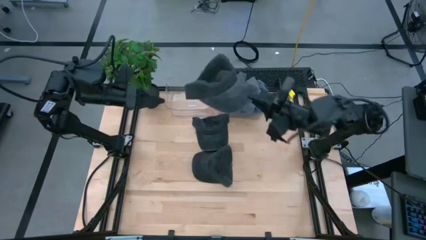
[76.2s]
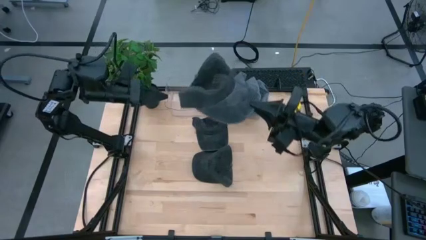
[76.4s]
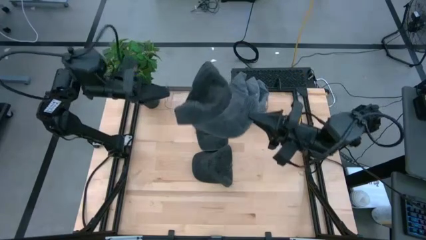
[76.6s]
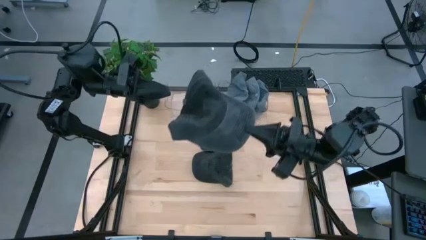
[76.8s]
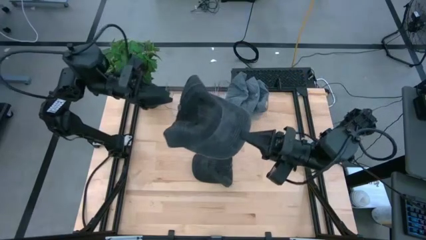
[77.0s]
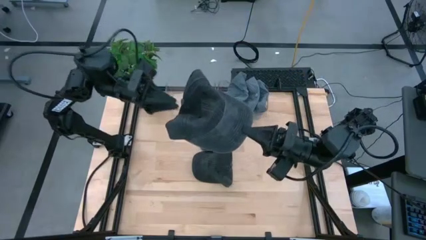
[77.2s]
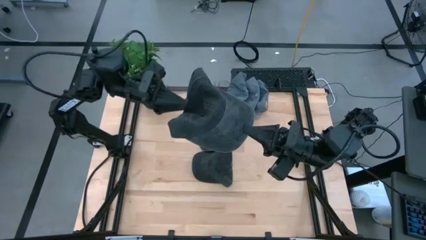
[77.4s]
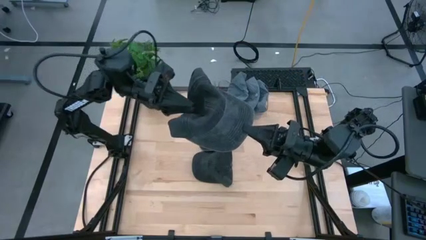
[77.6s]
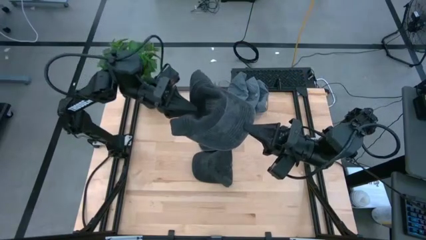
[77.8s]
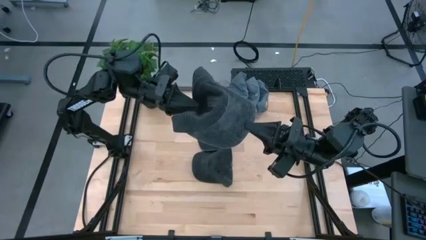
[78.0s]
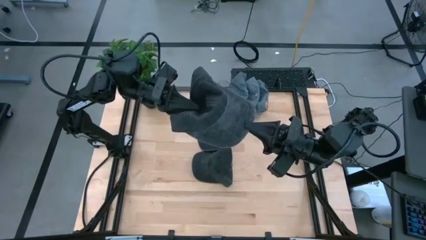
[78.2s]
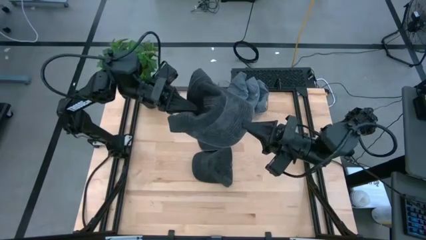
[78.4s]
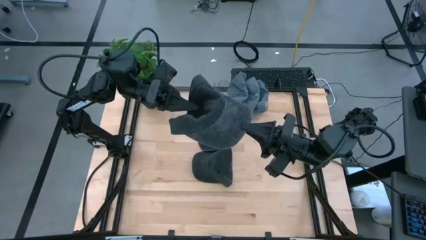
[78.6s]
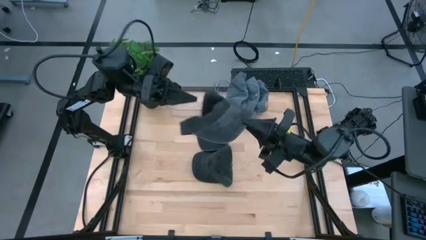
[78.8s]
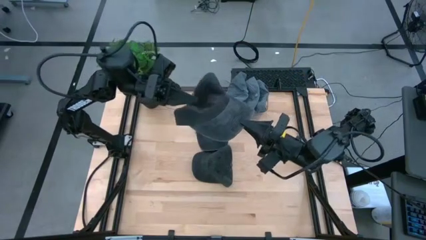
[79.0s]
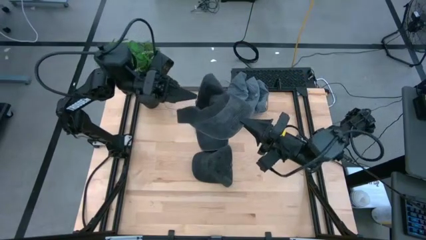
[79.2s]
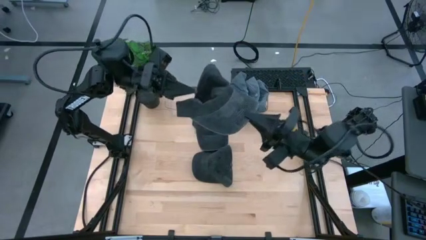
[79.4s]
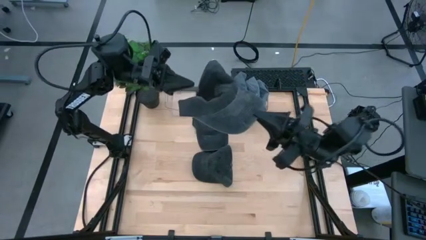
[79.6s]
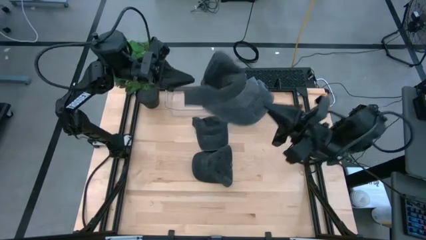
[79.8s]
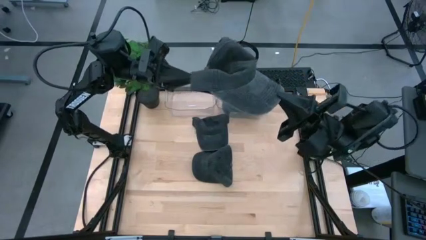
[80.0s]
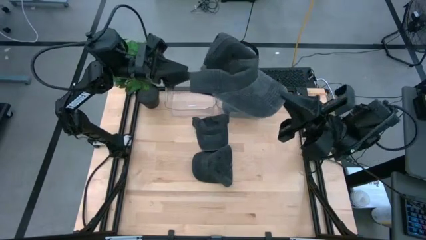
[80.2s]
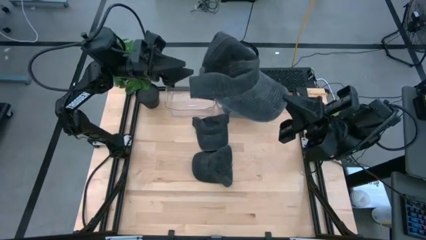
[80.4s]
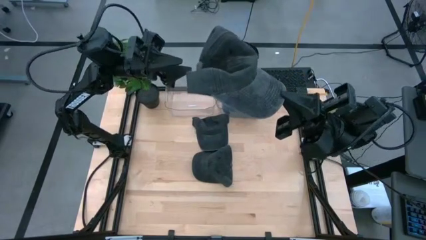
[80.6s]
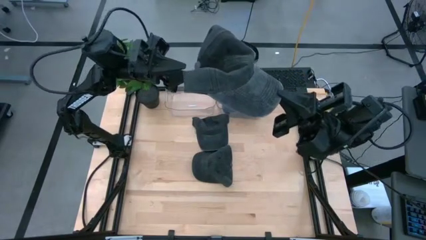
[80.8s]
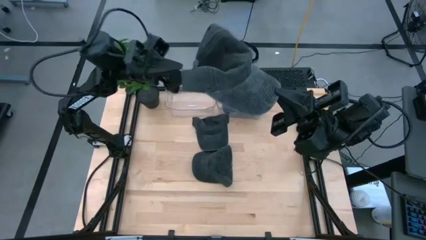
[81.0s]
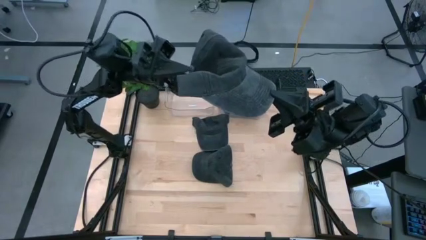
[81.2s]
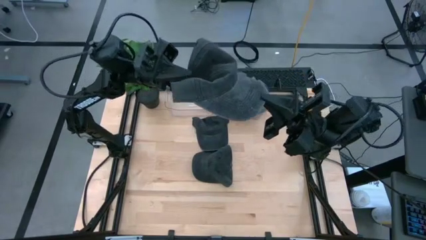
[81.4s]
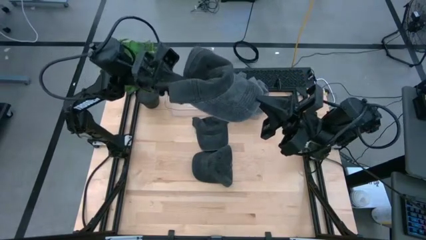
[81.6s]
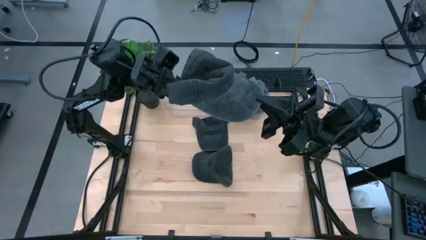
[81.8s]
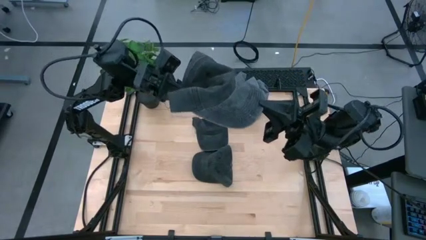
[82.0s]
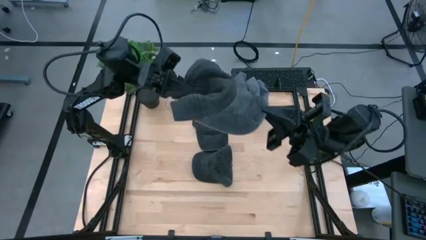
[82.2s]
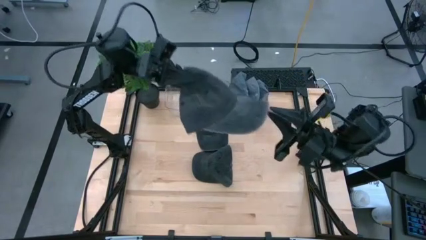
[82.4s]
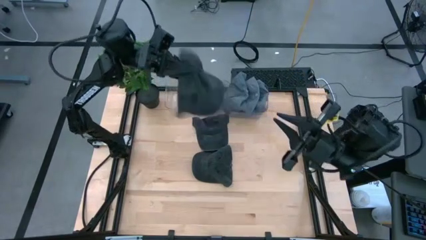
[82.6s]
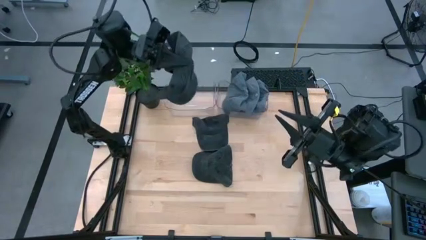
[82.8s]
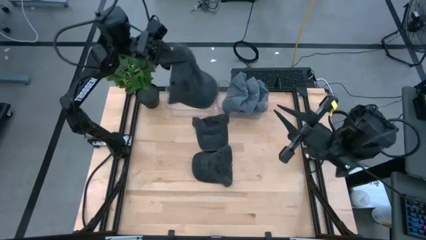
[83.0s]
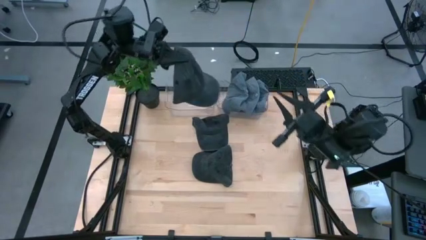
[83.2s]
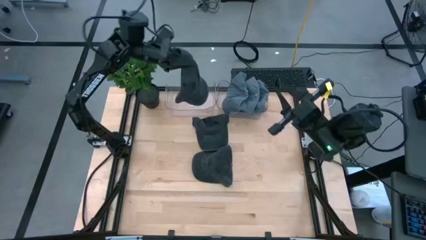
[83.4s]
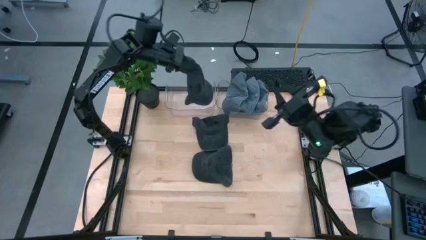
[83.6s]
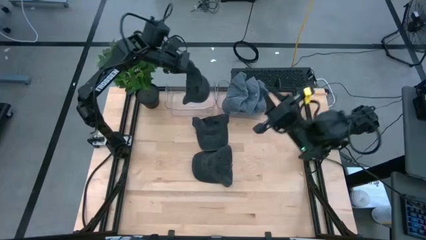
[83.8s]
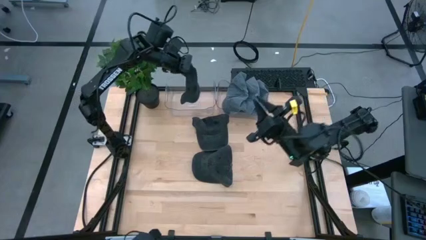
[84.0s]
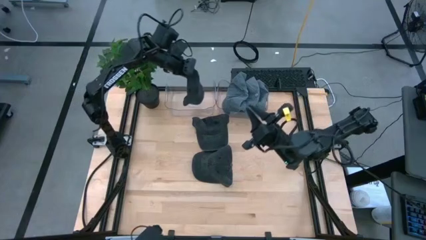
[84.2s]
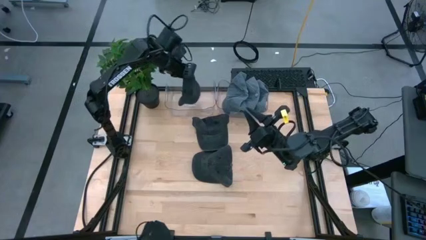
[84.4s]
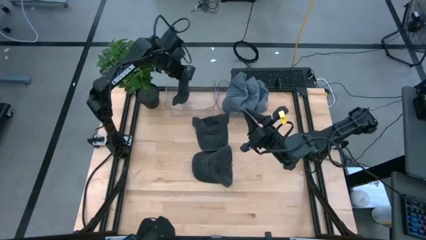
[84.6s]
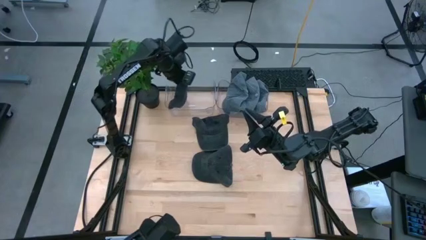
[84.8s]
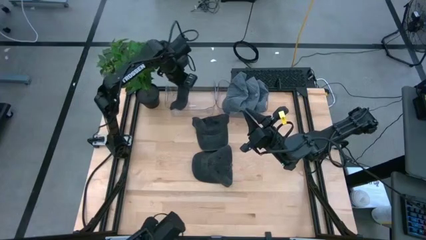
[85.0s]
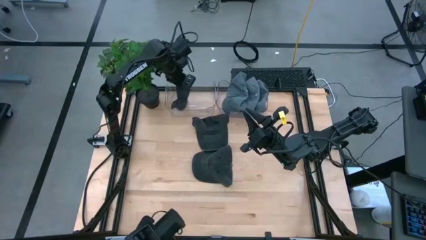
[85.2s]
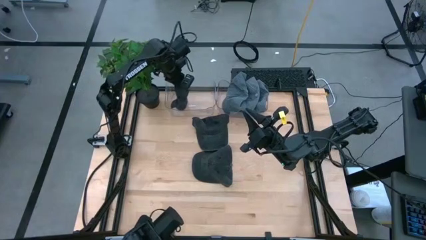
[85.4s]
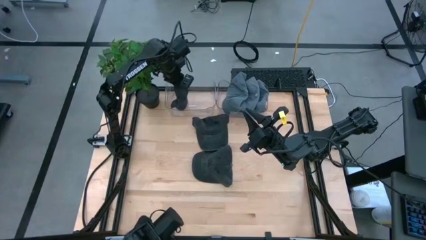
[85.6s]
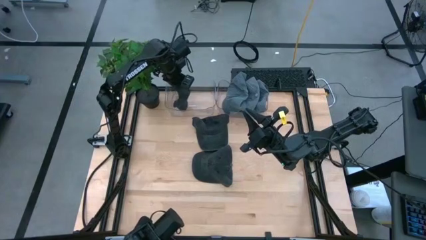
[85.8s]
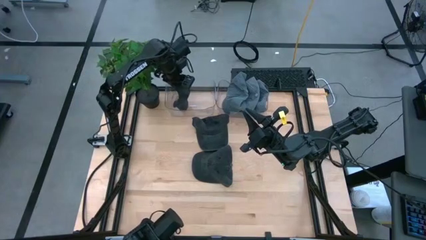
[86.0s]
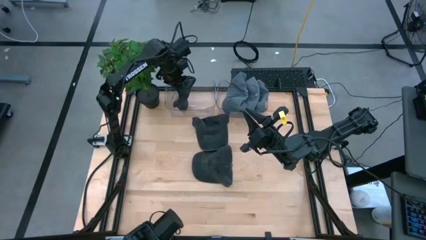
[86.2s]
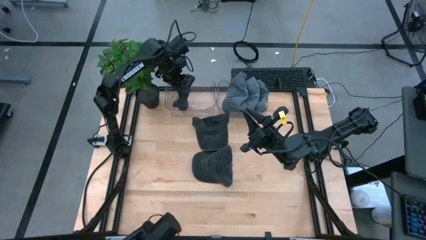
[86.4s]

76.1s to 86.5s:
Task: Pick & Place hat
Put the bottom right black cap into the left transparent bin

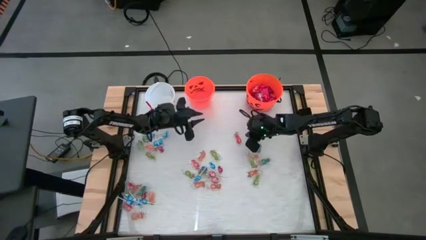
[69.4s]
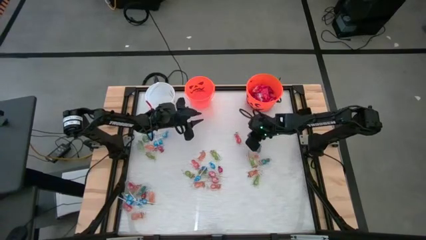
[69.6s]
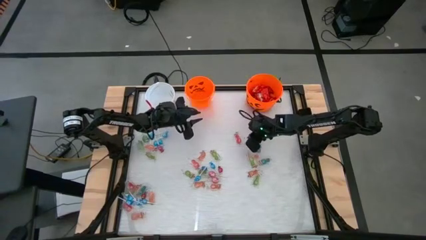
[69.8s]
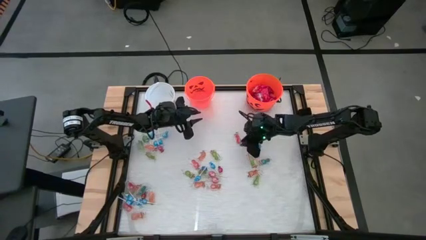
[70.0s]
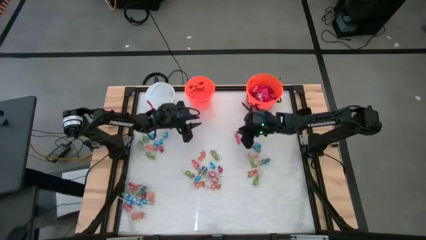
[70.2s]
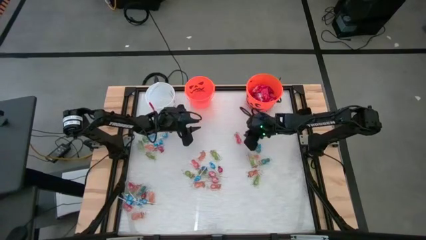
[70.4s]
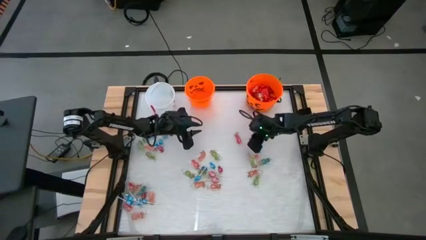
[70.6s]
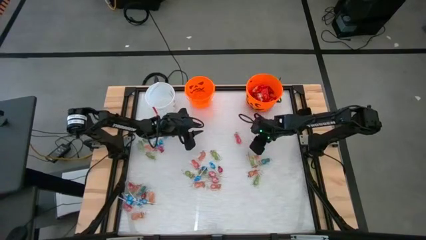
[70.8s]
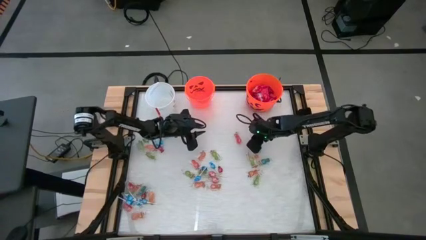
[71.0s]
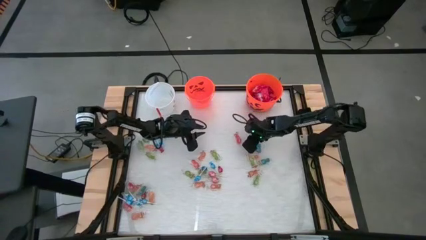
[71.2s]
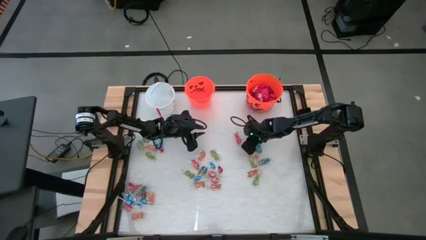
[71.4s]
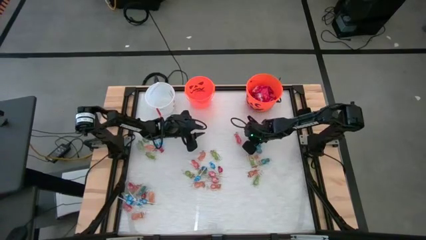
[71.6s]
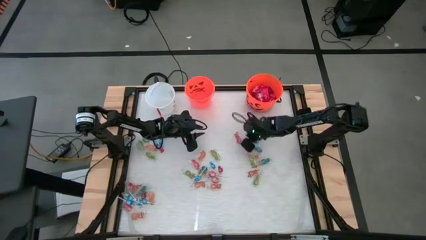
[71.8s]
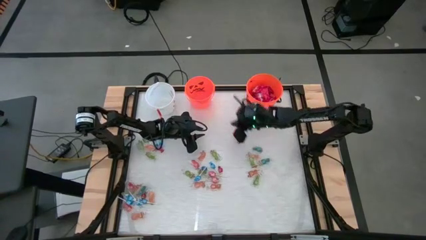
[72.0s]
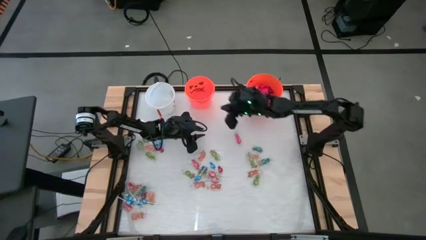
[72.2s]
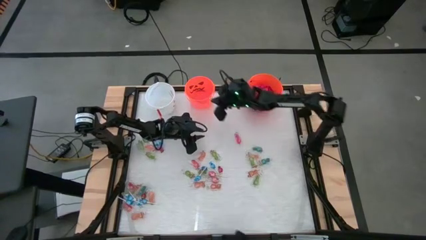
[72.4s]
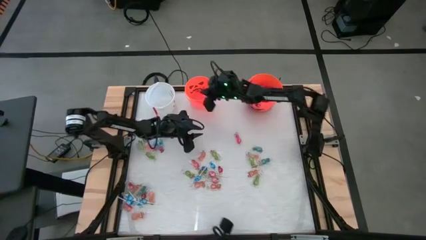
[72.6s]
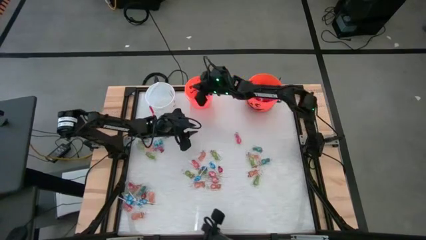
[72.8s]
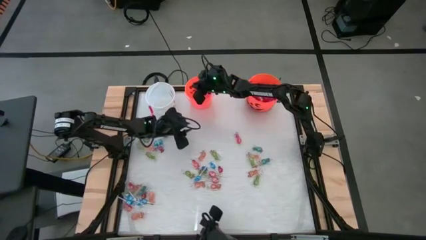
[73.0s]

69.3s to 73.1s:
Task: Sort candy by brand, put in halloween buckets
Put the blue lollipop into the left orange bucket

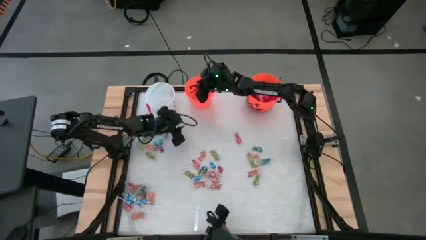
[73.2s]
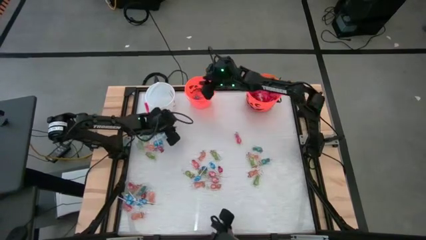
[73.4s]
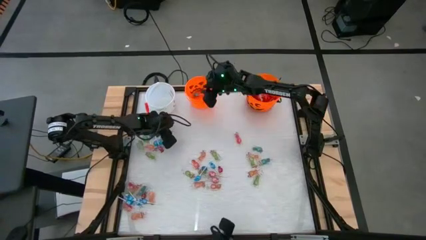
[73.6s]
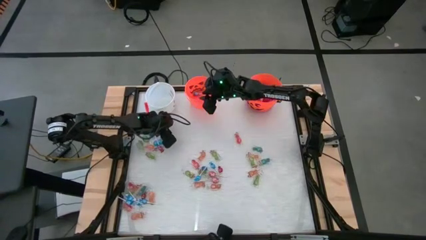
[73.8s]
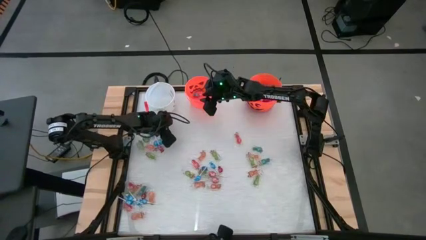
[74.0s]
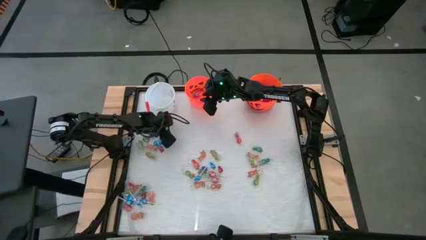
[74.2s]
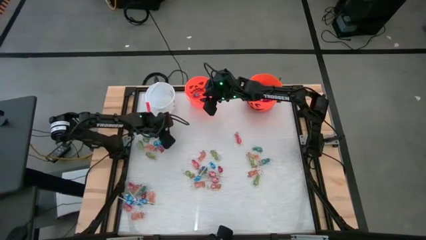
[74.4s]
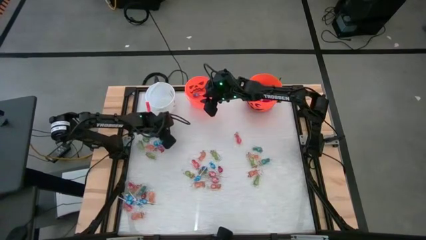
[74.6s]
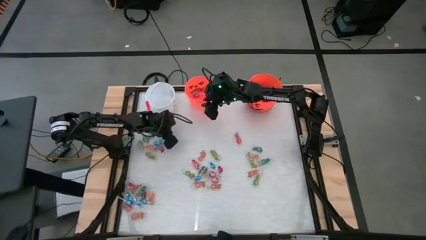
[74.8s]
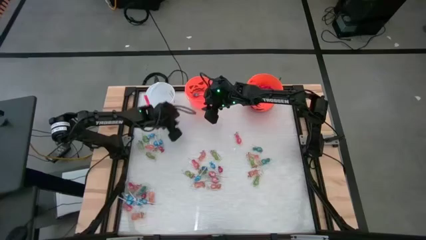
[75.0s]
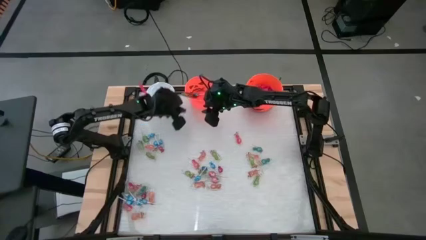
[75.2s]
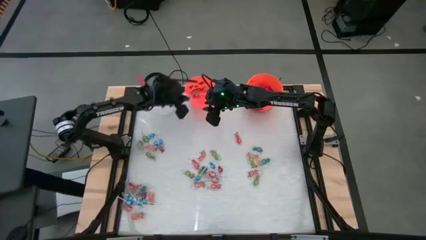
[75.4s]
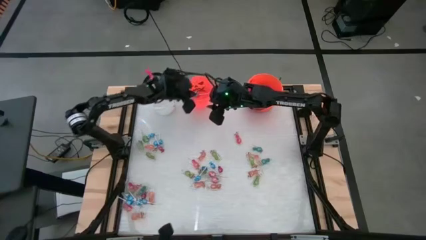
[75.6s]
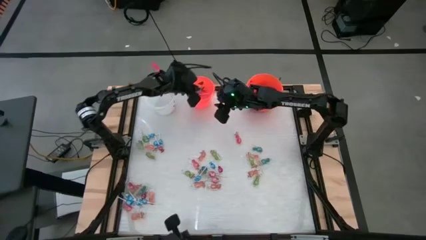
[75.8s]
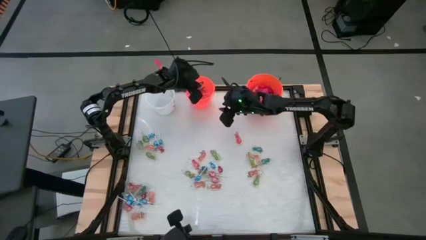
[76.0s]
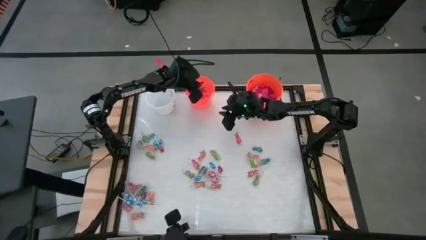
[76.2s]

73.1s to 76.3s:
Put the blue lollipop into the left orange bucket
